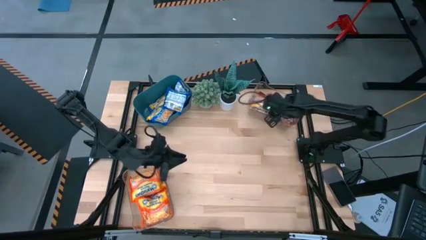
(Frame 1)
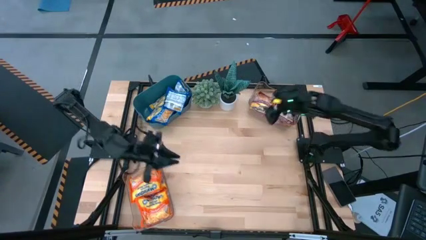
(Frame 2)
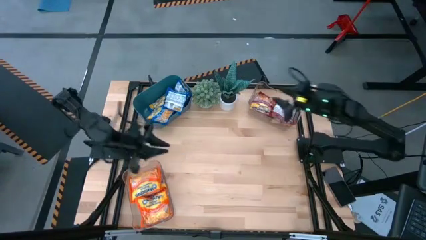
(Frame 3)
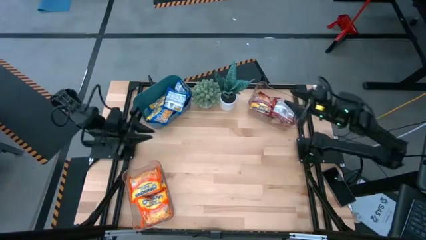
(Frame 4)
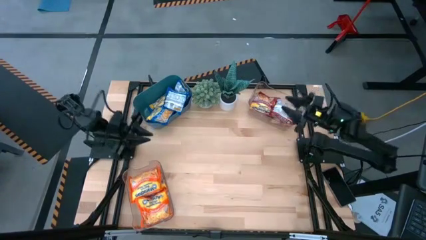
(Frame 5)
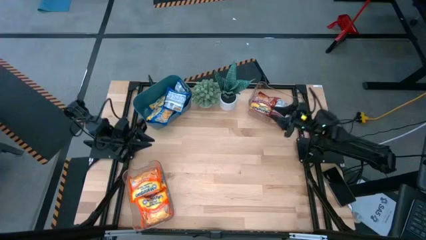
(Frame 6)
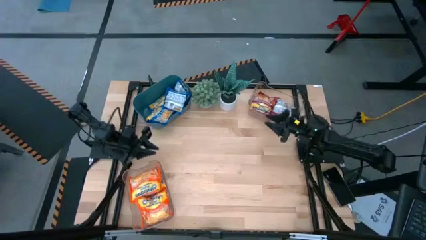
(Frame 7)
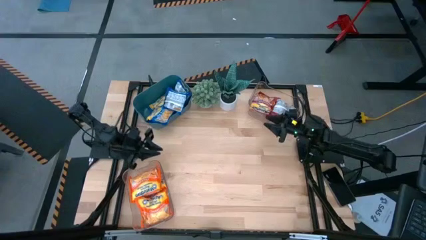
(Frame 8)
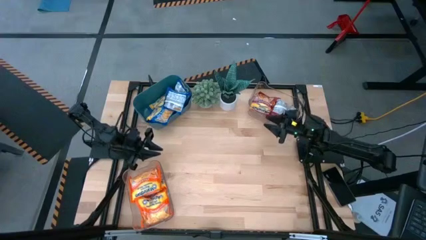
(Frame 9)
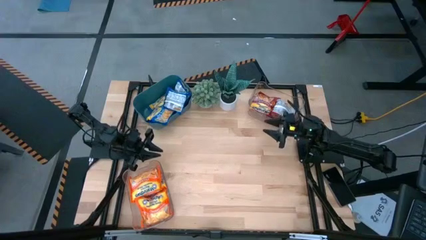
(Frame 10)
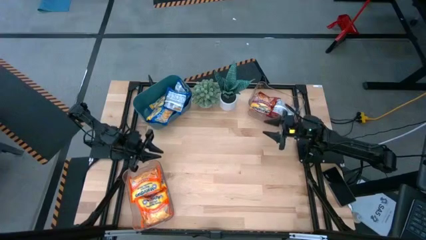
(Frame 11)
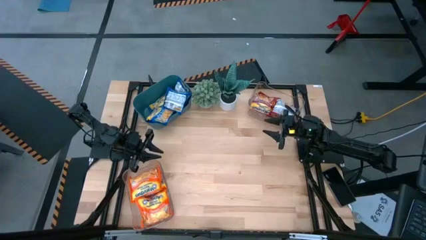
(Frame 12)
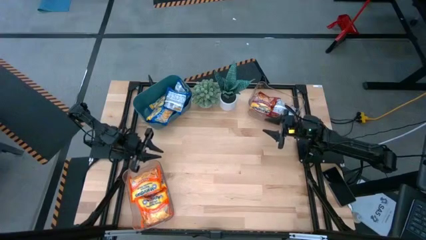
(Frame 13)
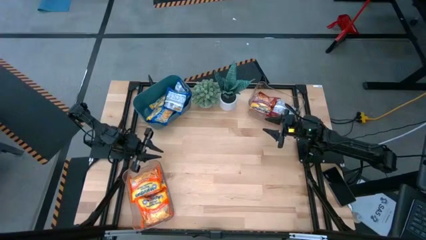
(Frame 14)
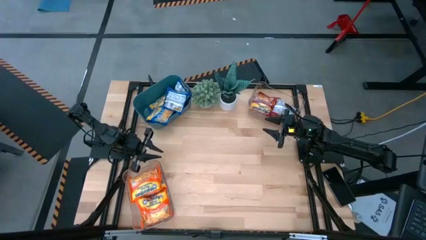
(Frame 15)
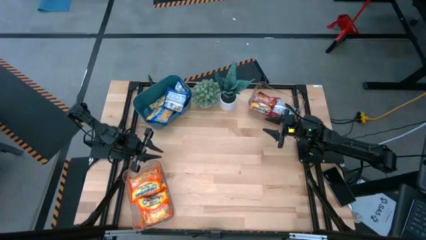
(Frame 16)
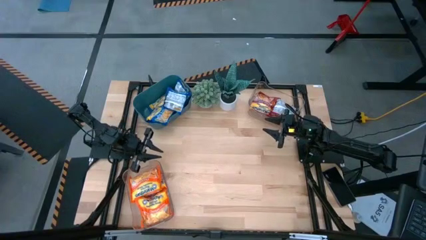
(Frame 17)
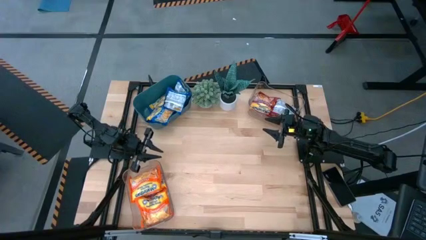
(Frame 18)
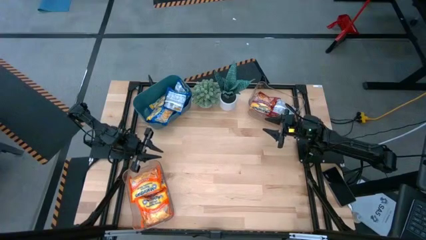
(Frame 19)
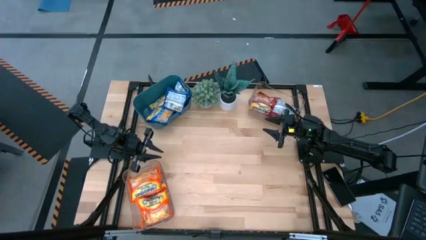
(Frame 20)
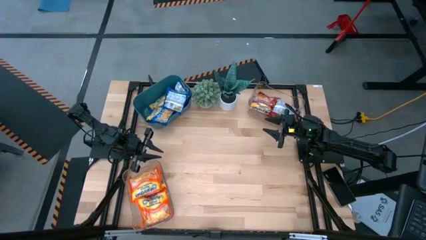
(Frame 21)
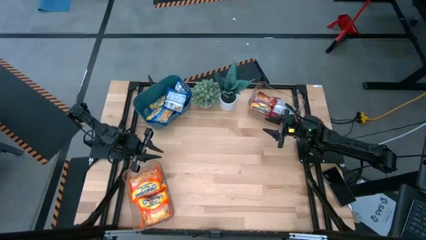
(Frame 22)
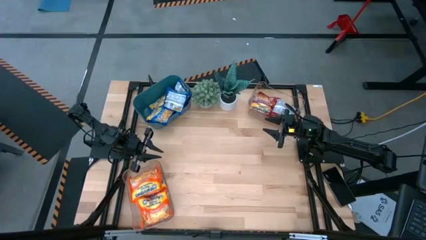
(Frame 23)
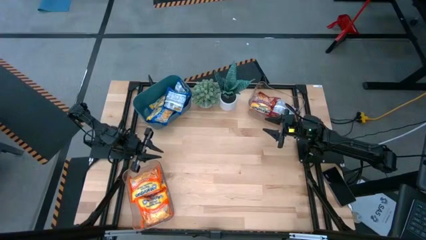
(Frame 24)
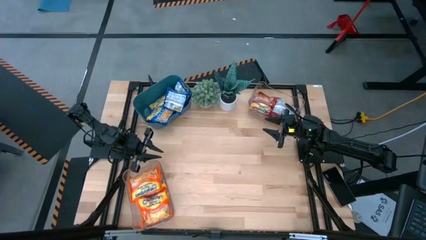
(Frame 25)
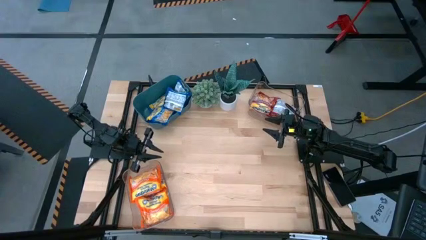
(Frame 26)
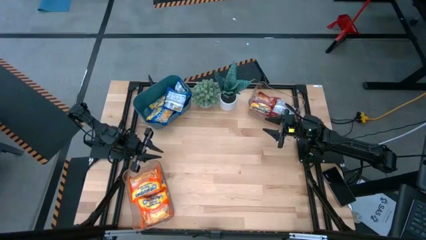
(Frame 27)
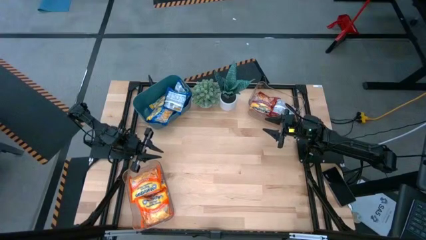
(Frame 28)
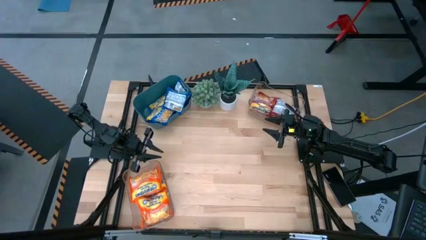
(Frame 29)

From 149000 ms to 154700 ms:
Task: Sort Maruchan noodles
Return to Home Position

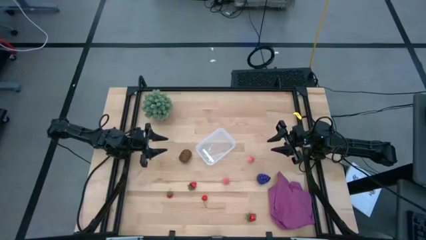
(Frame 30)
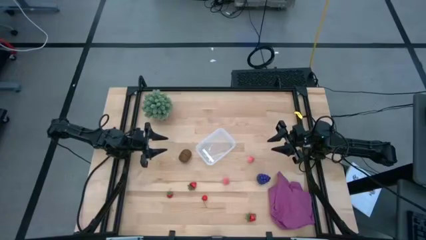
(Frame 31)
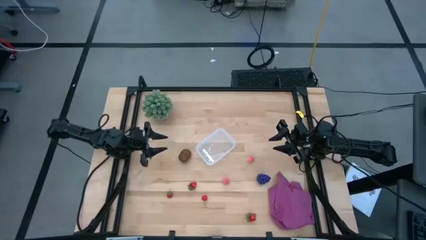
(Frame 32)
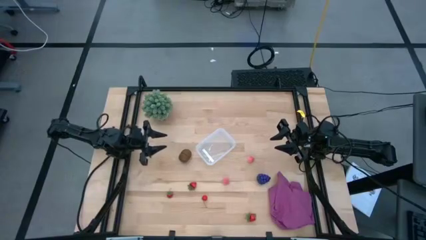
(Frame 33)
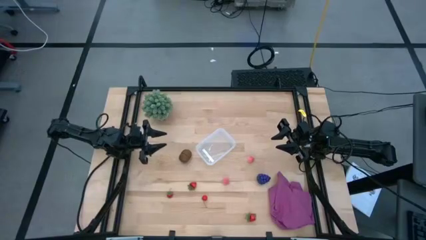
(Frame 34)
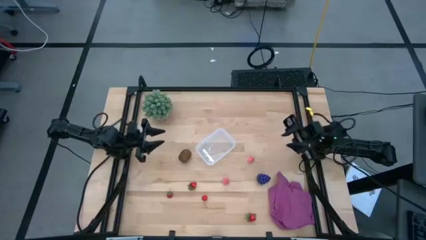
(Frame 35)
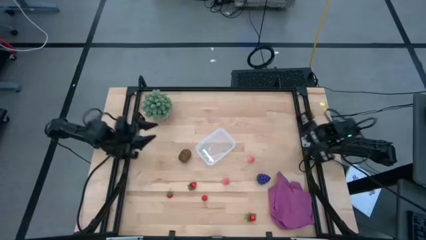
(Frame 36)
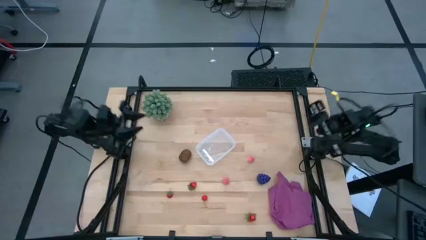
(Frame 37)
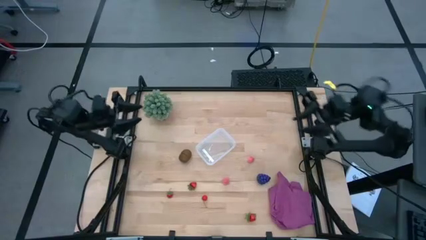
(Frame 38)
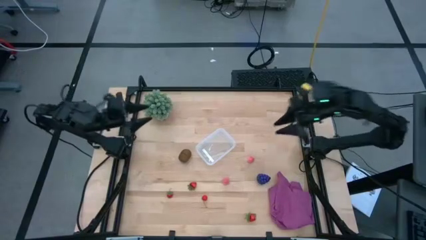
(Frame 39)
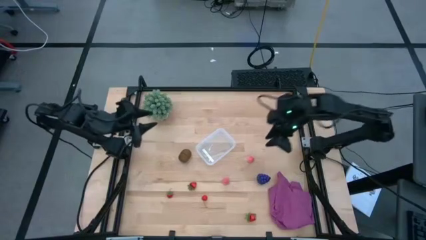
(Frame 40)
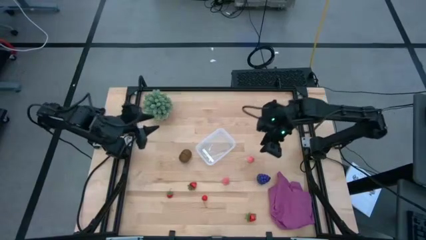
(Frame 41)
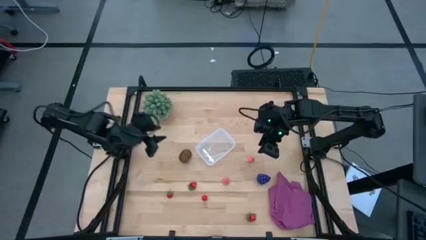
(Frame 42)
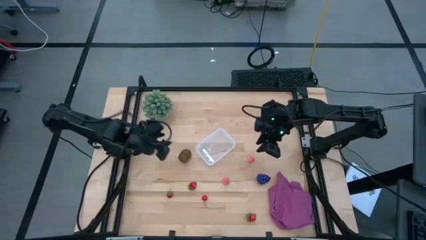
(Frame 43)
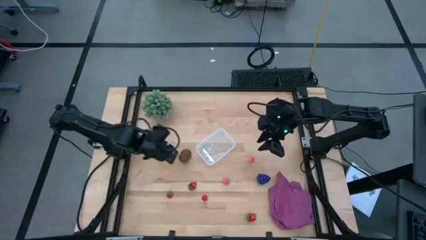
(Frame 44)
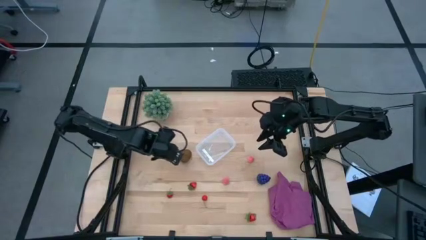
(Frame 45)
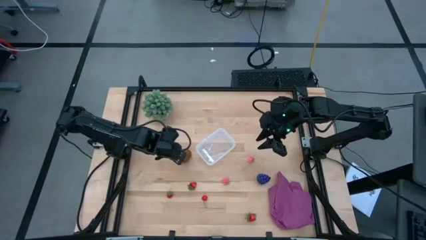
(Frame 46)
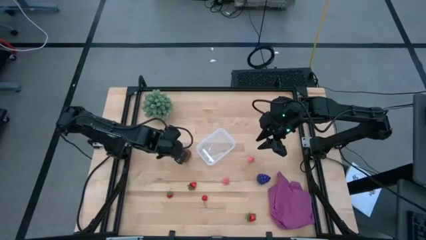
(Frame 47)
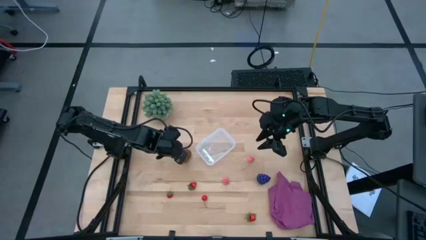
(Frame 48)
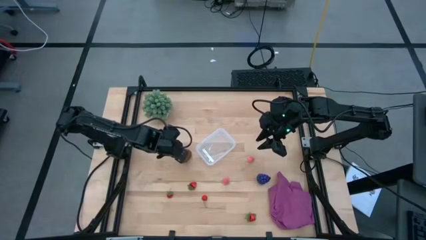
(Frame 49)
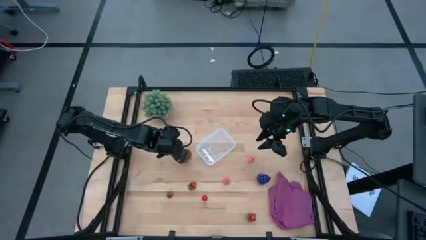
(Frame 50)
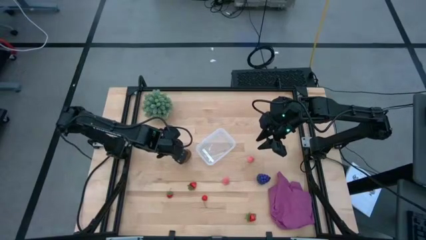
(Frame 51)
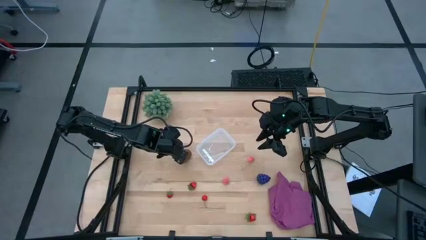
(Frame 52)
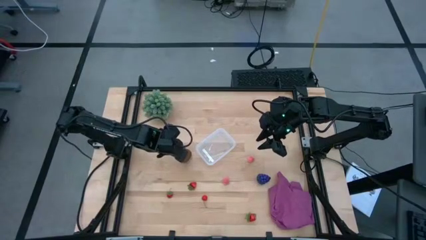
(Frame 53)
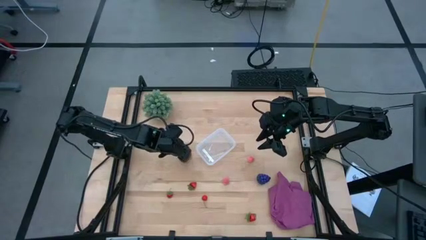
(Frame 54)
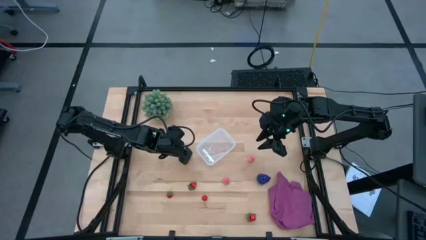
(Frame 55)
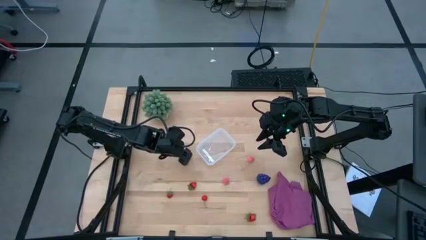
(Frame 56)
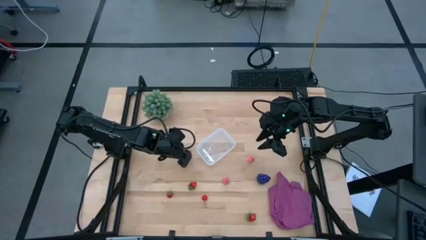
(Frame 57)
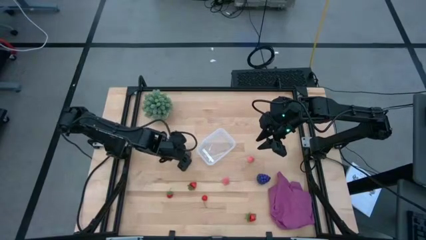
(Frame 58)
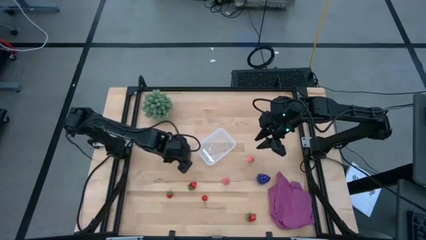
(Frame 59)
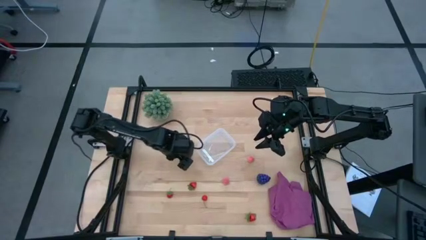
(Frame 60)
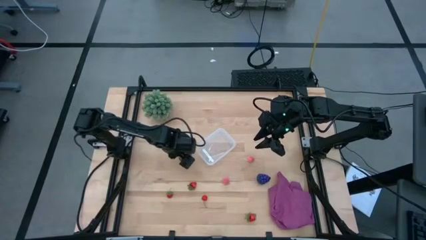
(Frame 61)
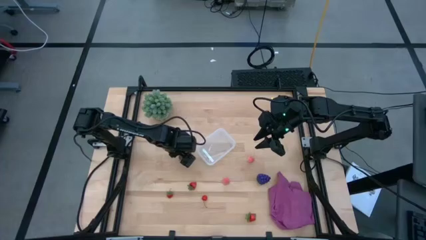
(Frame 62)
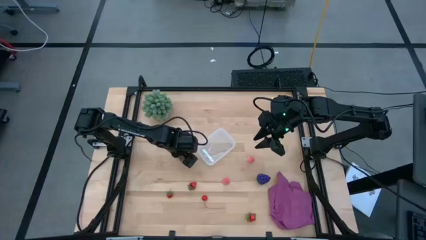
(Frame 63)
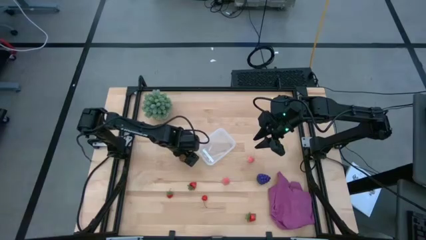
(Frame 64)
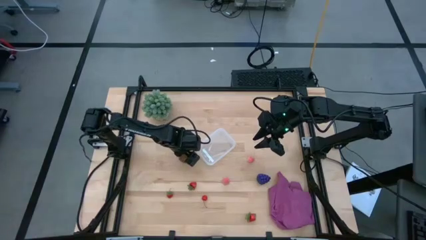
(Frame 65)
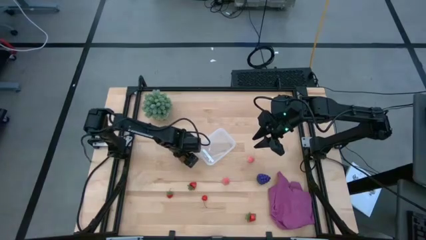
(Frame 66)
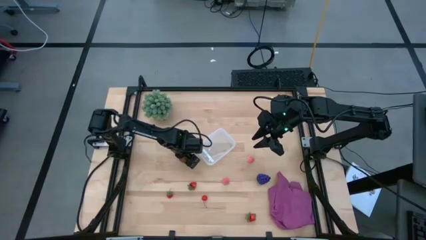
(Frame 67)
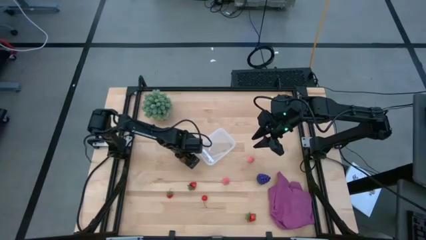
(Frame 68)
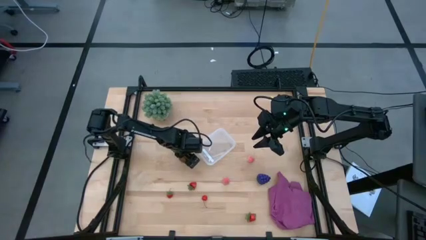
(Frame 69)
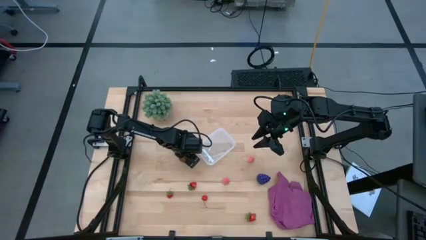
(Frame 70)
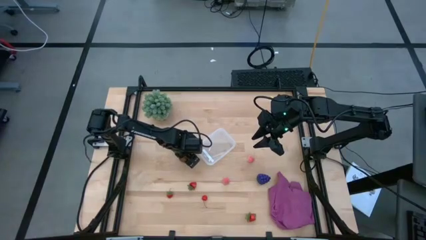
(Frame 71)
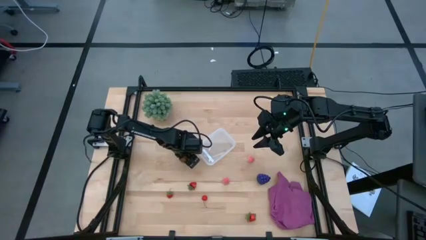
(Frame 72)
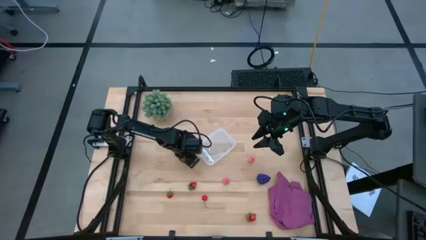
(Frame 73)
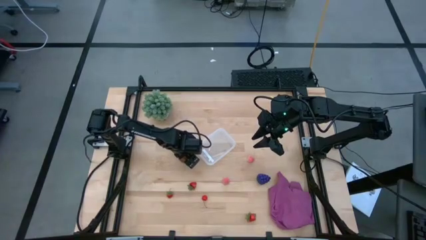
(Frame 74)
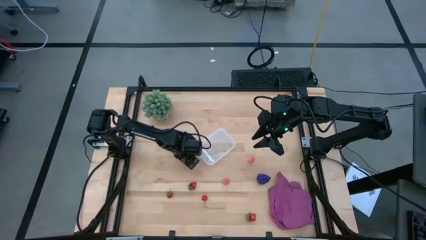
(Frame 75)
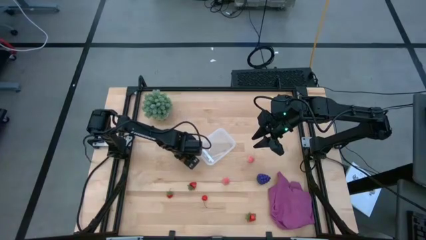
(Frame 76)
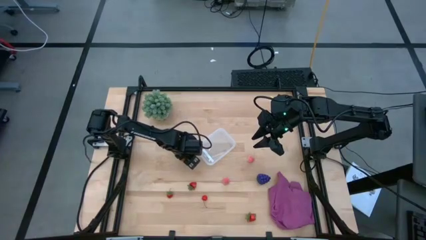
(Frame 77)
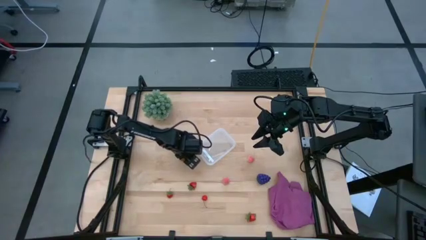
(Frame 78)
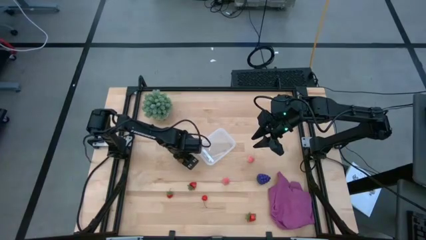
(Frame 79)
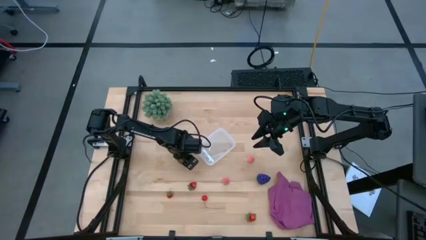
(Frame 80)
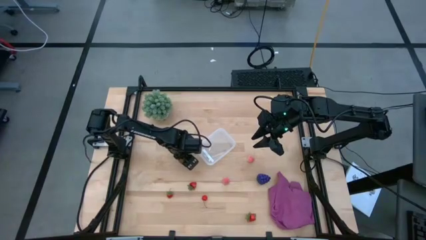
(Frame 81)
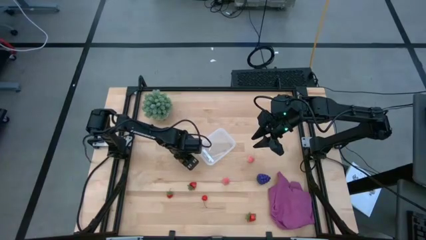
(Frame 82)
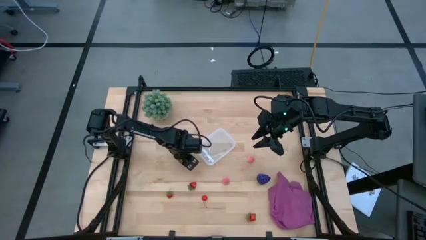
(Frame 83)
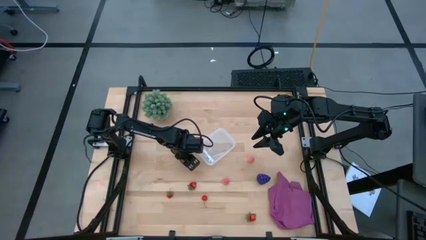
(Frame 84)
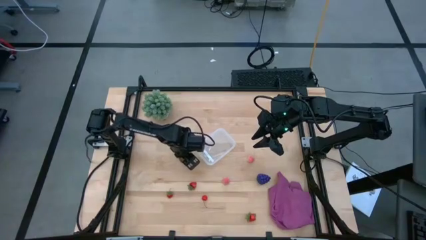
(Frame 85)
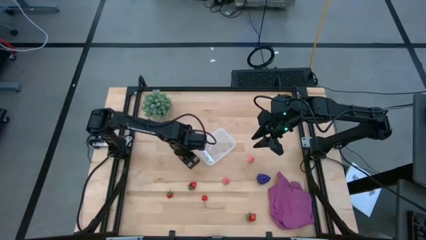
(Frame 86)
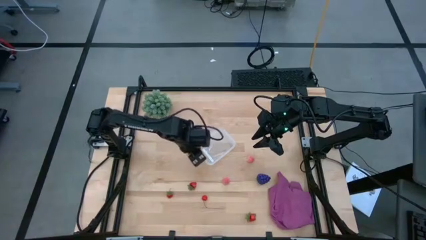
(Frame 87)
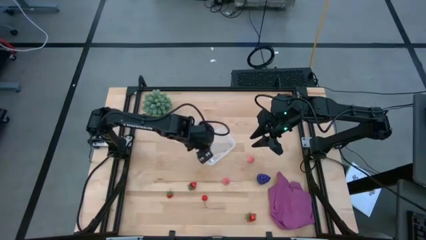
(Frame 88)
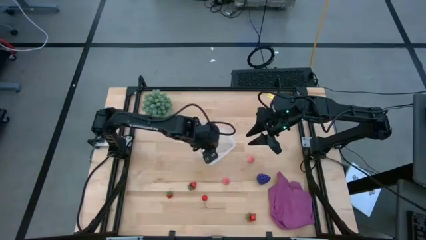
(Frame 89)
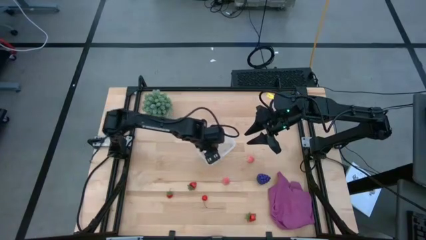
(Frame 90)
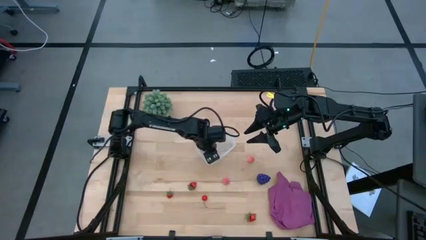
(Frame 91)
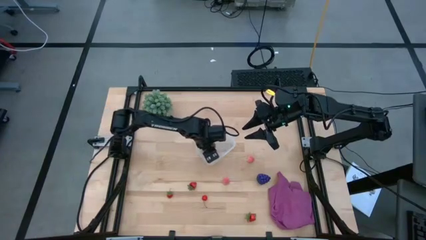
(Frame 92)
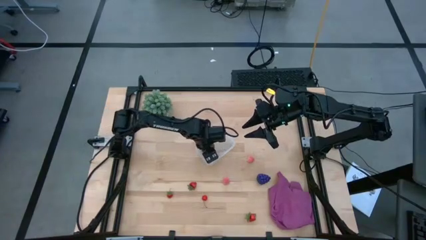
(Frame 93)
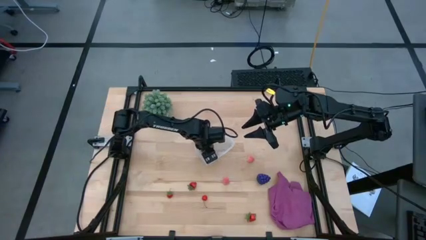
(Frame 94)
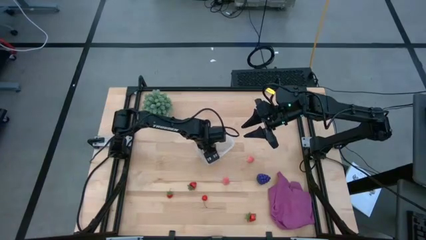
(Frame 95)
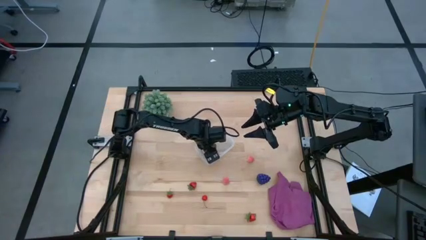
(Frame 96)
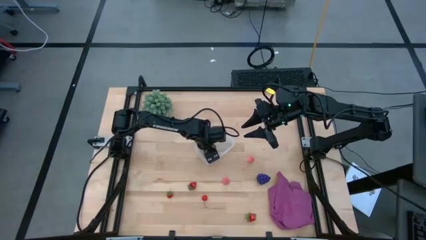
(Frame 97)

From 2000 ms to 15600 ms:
Task: Pick and placing Produce into tupperware
Put the kiwi into the transparent bin
